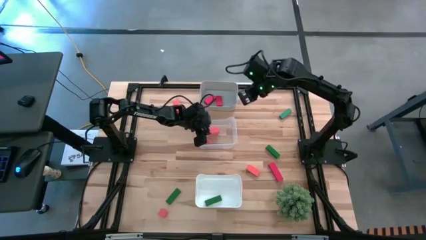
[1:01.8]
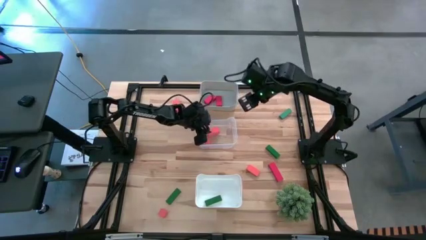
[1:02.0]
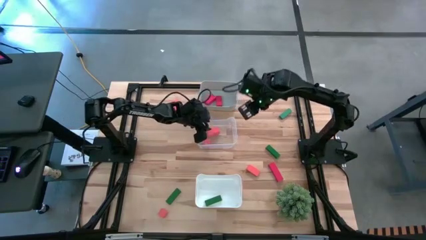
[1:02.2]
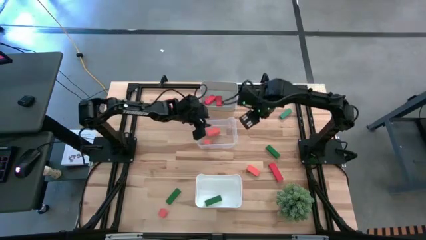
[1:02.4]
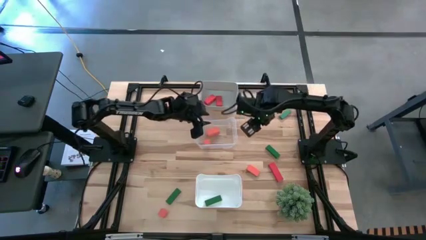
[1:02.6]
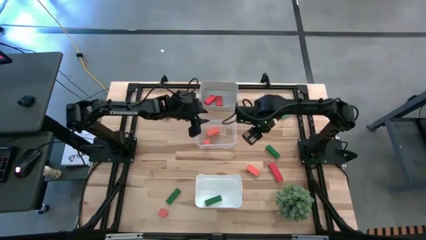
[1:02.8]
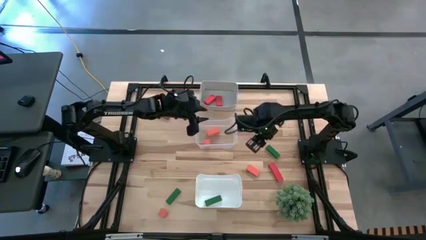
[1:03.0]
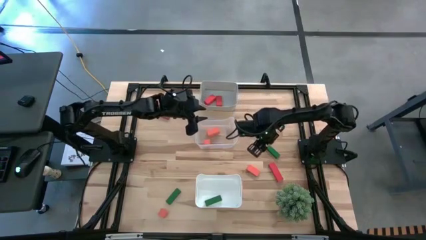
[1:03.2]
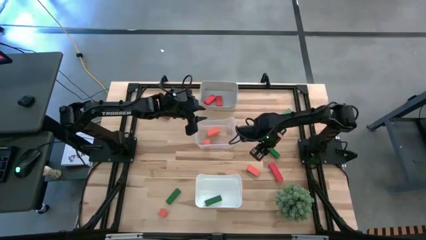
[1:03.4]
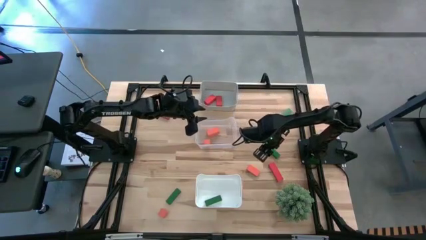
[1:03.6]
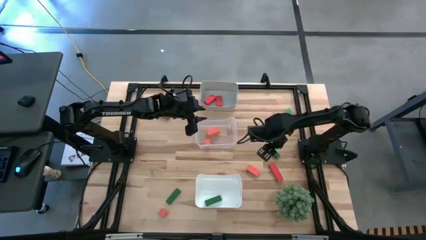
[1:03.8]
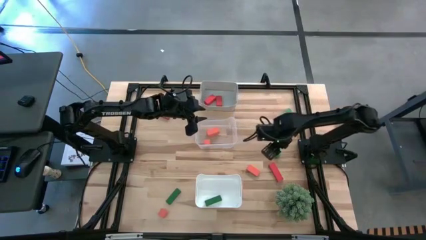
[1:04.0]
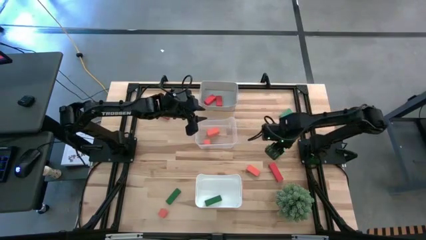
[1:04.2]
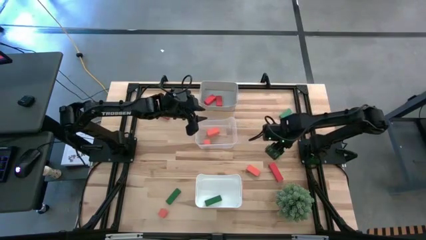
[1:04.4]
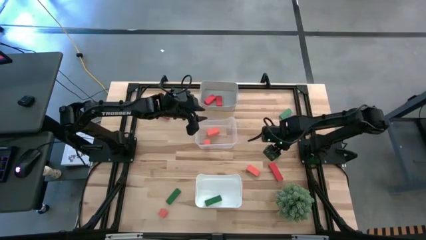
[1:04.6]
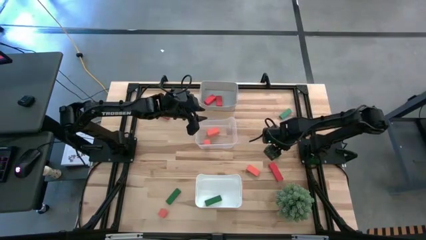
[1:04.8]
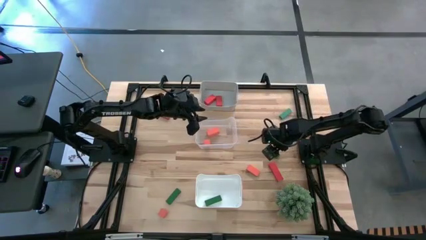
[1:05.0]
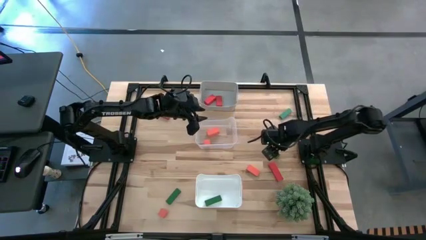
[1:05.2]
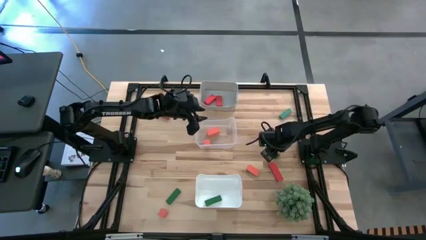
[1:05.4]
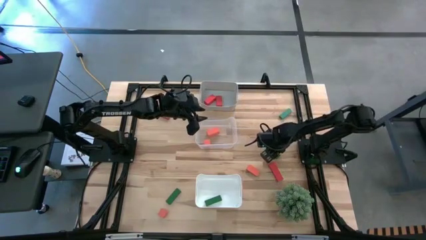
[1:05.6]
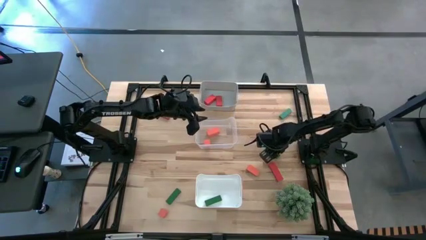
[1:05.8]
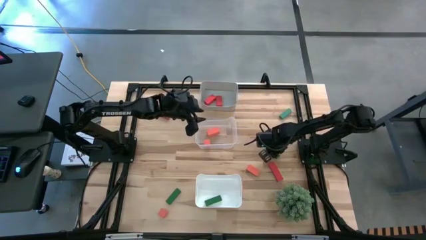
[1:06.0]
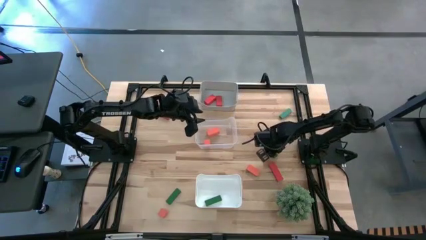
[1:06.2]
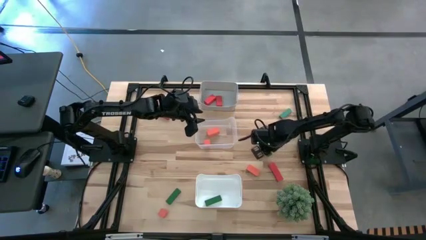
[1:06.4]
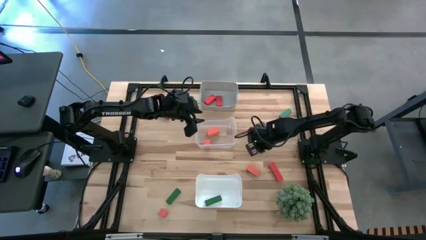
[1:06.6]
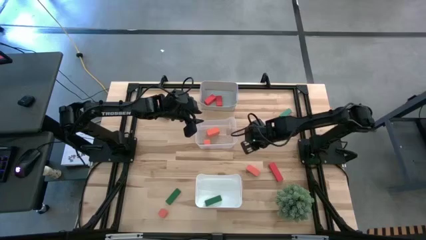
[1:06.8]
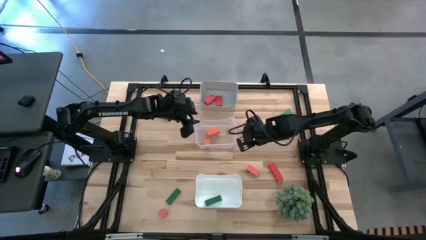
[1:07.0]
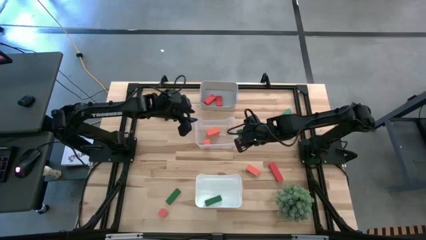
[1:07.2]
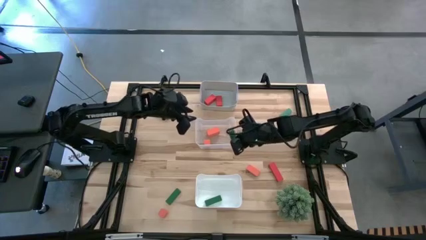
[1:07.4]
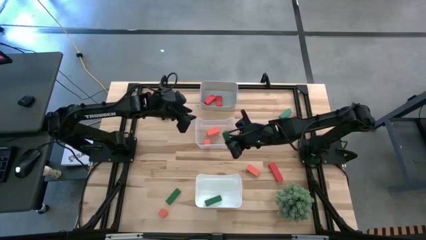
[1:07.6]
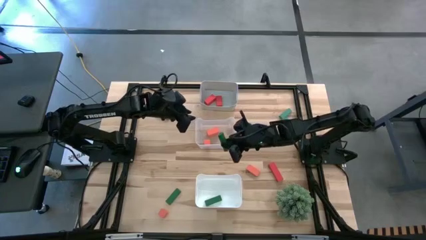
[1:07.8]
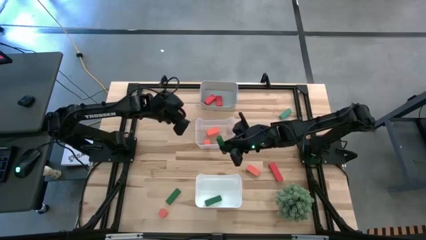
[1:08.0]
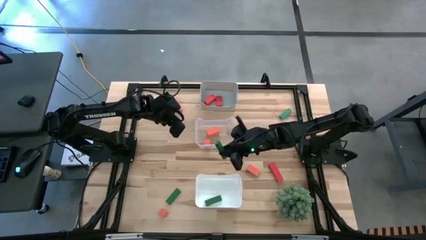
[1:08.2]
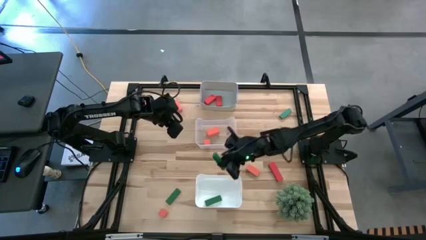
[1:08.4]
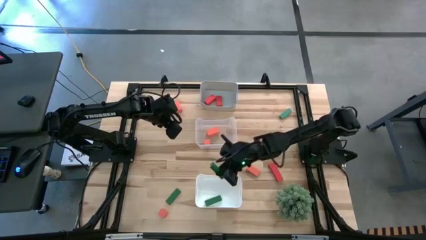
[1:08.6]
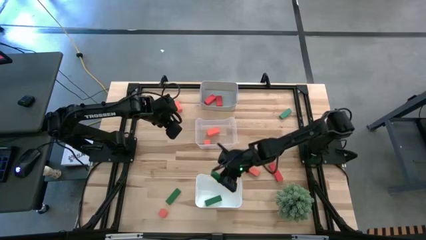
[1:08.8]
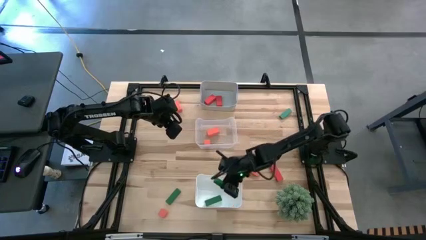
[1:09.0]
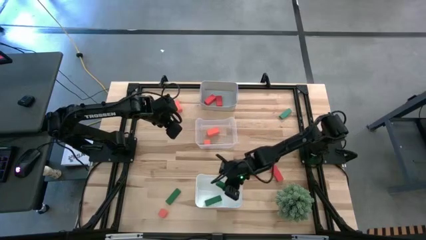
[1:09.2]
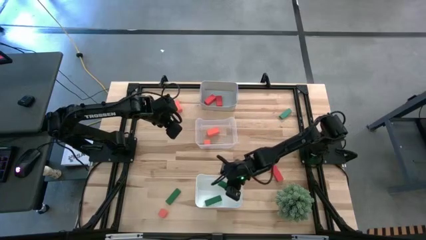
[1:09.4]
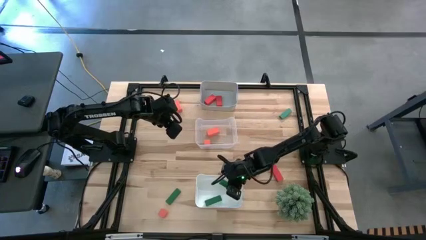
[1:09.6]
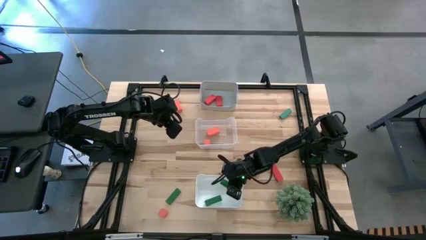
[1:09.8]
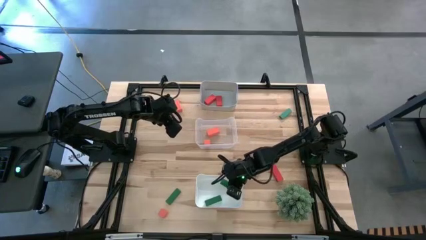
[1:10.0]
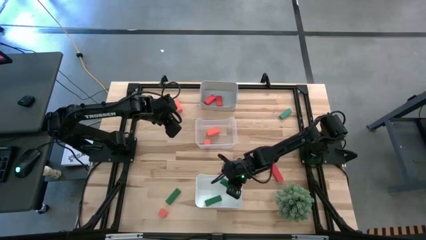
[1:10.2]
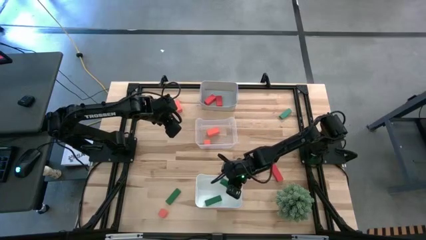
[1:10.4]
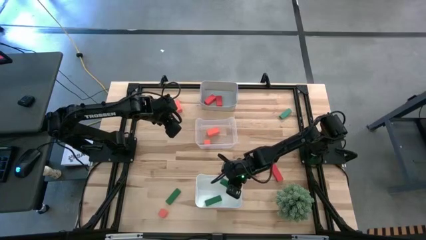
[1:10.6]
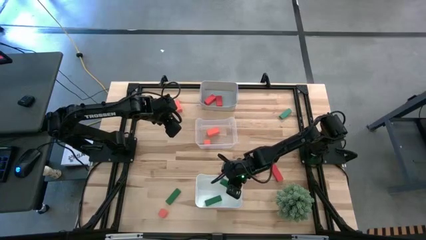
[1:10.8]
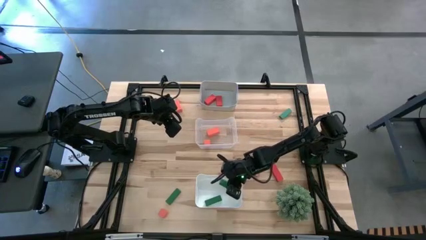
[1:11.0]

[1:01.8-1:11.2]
Task: Sort & place blocks by color
Put the center right green block into the white bin

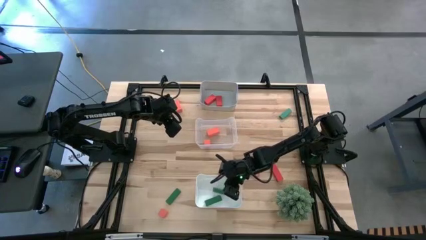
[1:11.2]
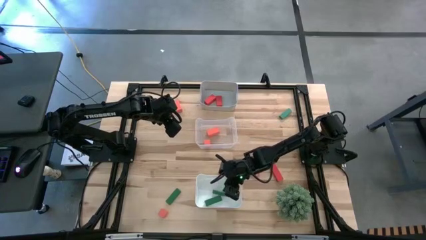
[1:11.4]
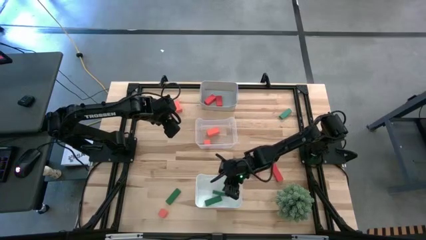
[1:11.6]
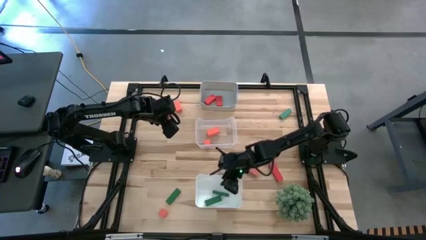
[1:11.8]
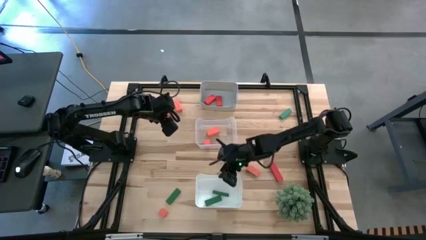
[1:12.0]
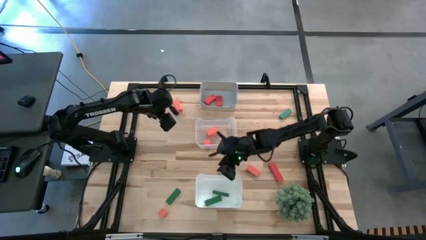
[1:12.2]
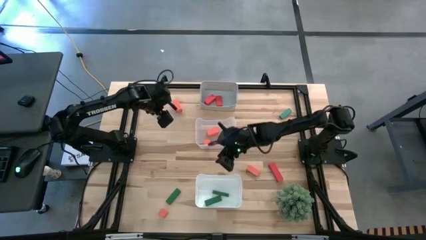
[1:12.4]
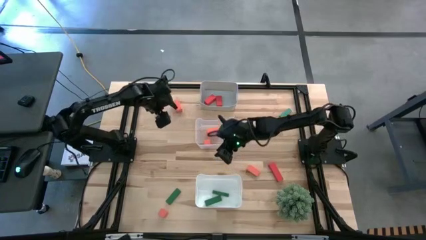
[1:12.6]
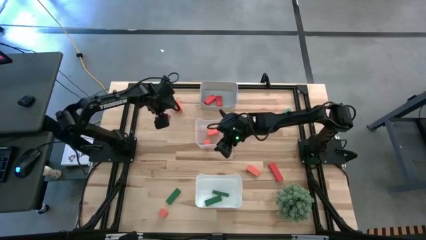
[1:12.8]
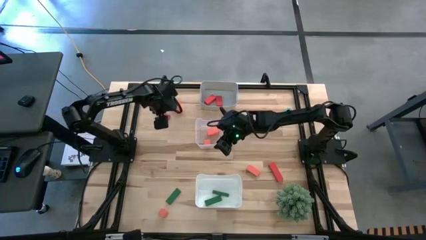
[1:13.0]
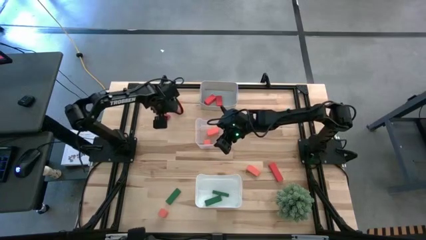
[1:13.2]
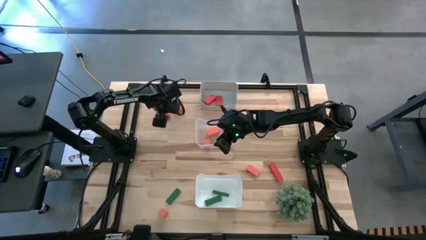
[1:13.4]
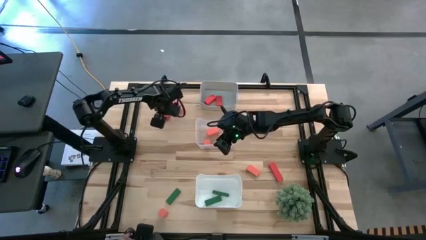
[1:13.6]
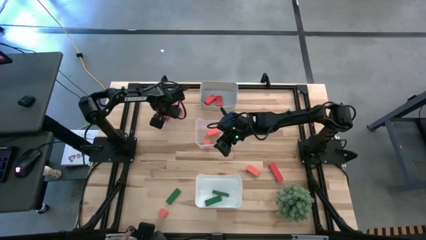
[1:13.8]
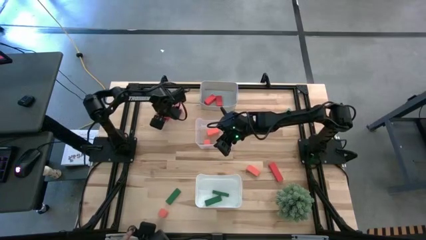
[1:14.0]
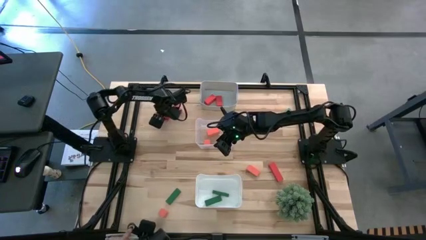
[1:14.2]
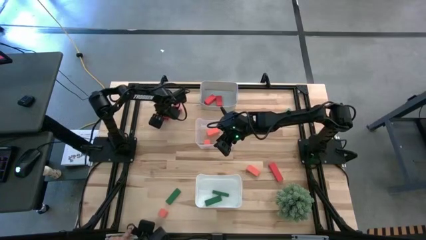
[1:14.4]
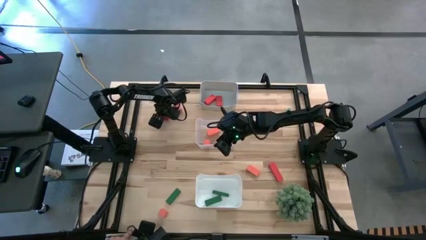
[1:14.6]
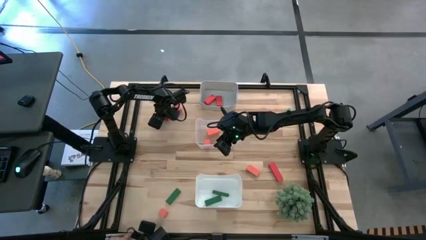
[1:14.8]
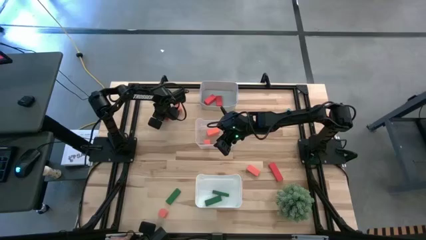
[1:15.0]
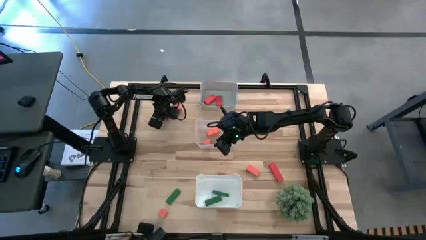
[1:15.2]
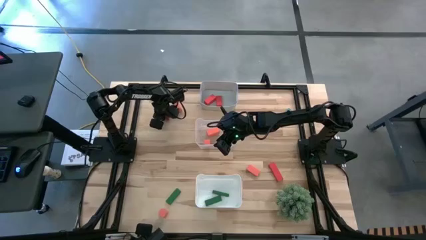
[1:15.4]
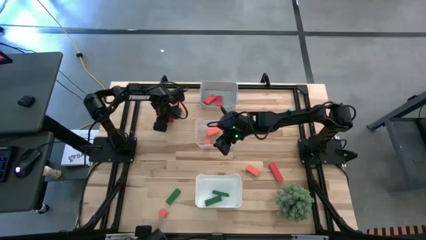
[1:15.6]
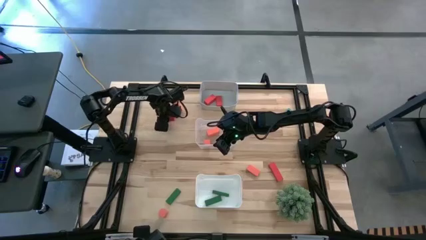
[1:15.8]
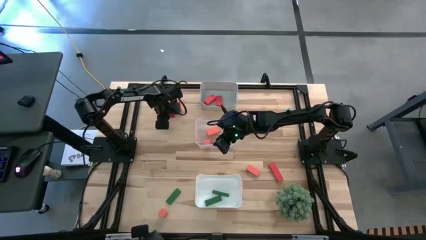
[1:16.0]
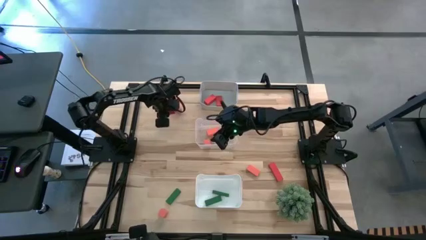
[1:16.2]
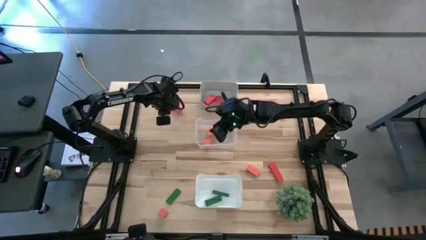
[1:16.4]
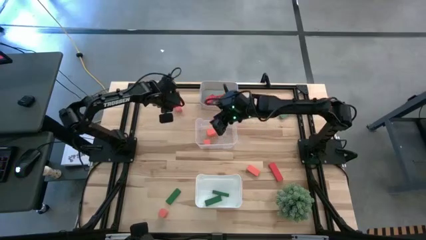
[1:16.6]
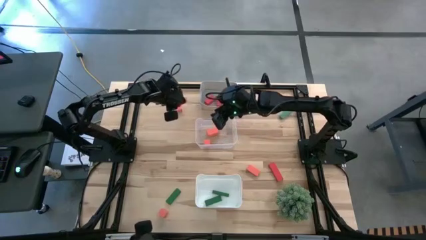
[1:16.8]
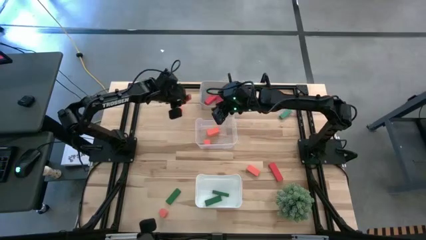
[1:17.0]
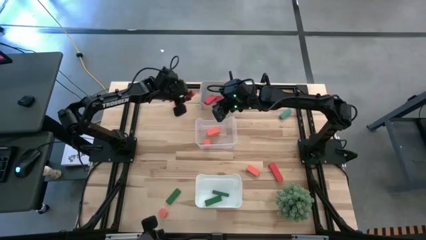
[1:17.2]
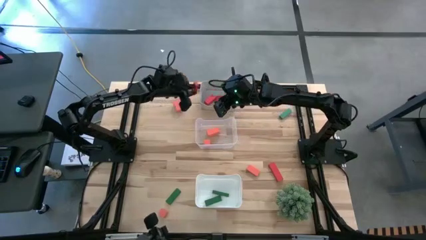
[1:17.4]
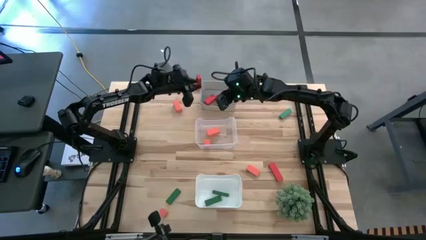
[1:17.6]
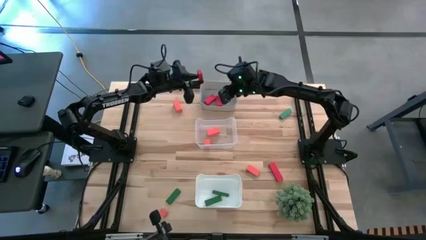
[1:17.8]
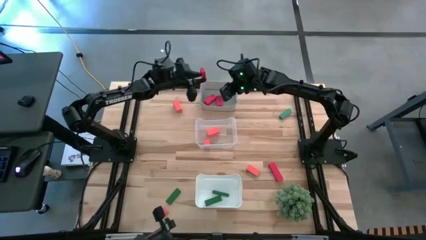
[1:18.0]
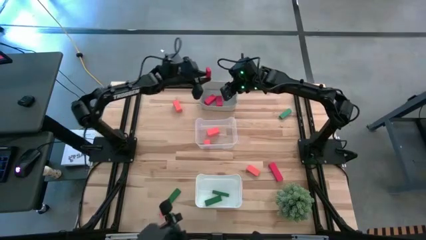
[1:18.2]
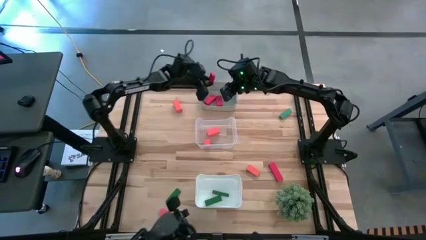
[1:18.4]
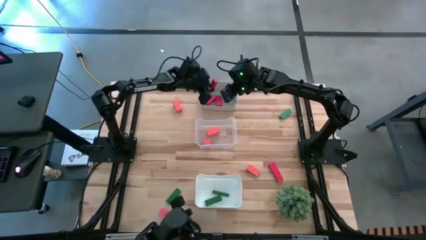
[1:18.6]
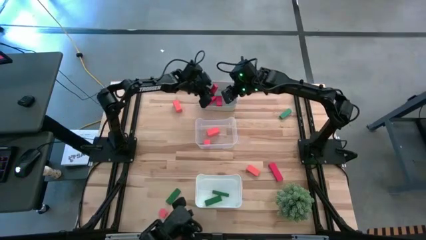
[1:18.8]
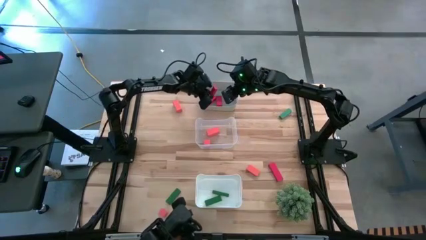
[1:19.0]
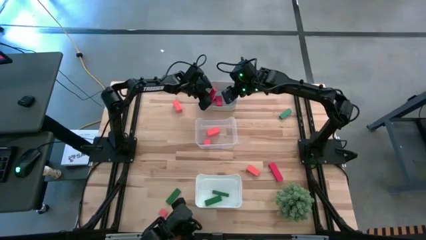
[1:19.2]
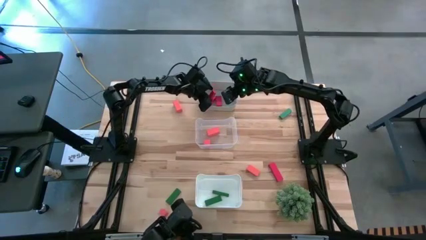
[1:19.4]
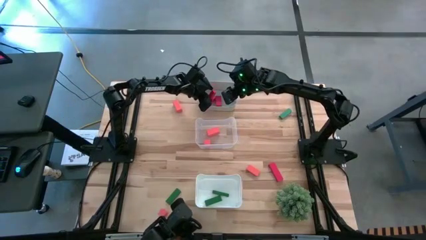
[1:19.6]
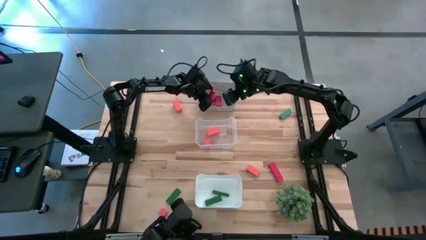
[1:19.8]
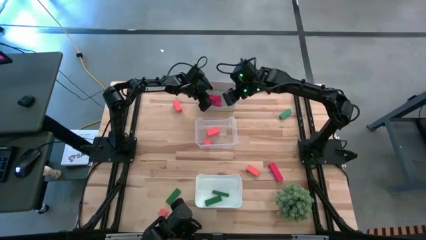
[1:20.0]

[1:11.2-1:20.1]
Put the top red block into the gray bin
